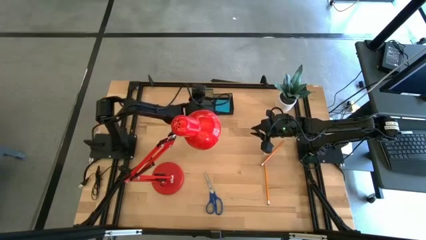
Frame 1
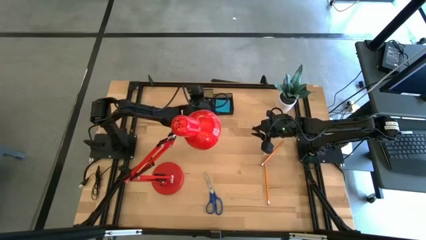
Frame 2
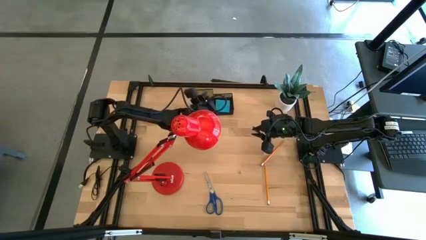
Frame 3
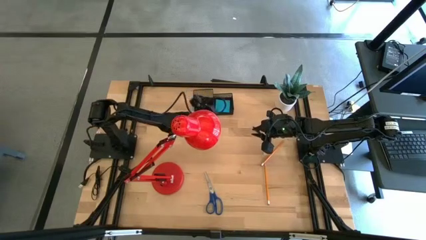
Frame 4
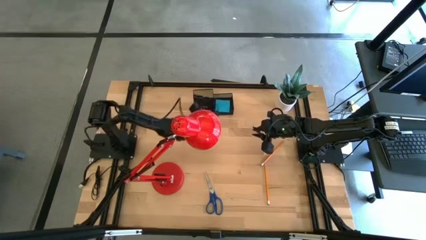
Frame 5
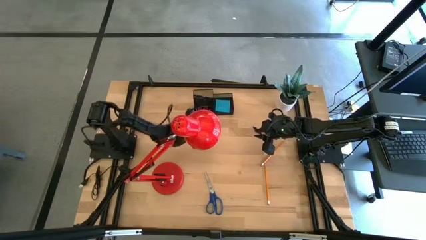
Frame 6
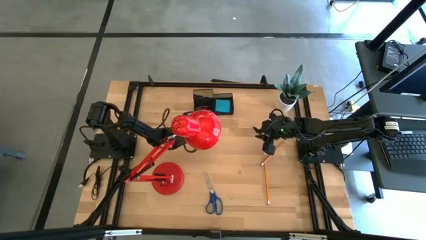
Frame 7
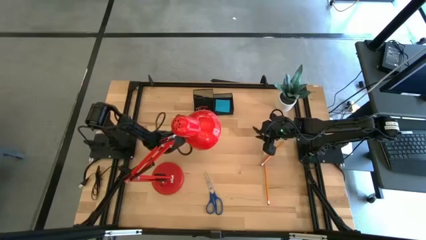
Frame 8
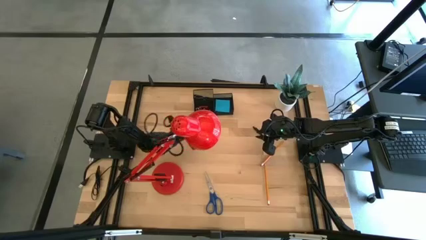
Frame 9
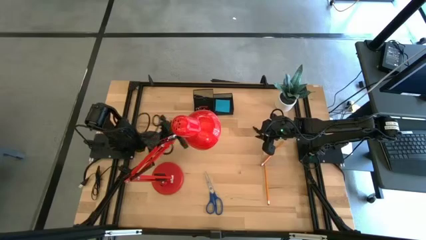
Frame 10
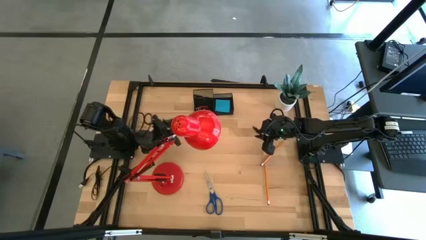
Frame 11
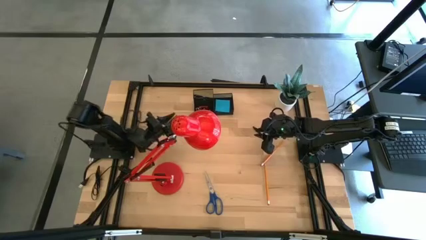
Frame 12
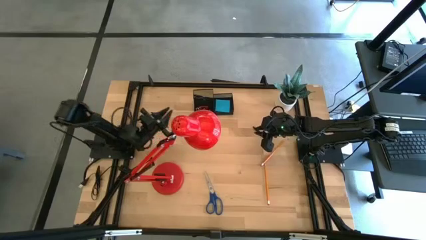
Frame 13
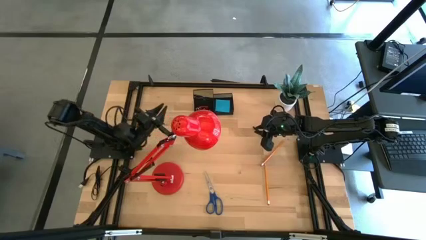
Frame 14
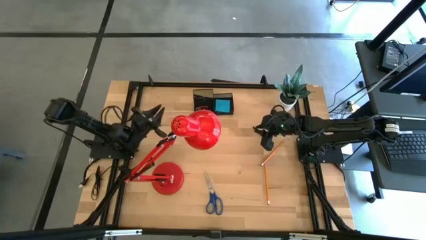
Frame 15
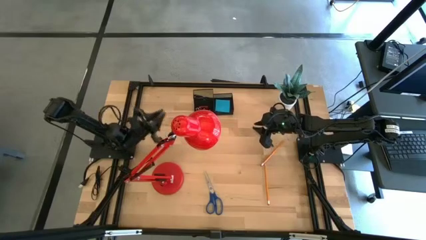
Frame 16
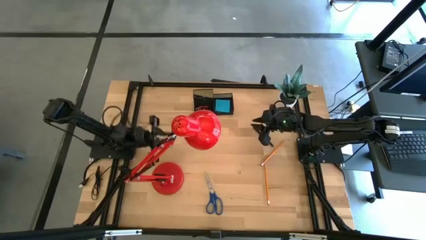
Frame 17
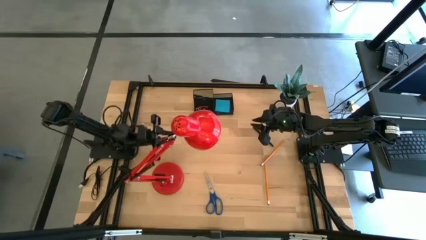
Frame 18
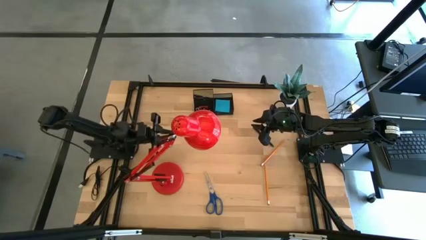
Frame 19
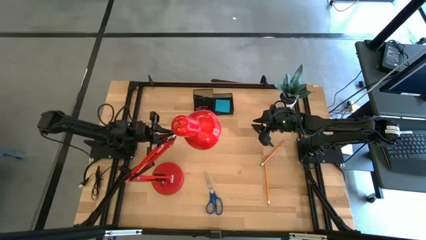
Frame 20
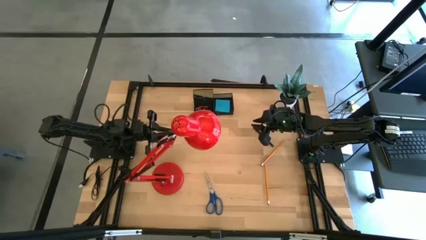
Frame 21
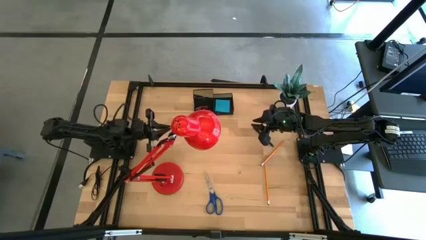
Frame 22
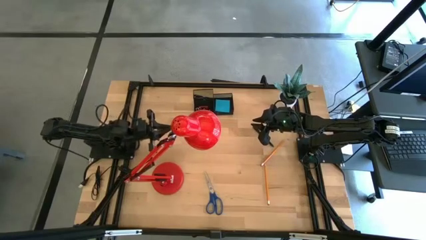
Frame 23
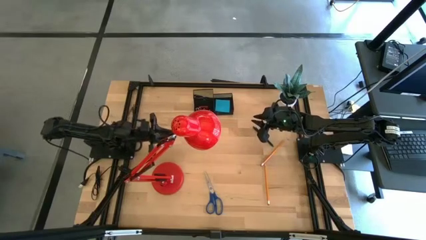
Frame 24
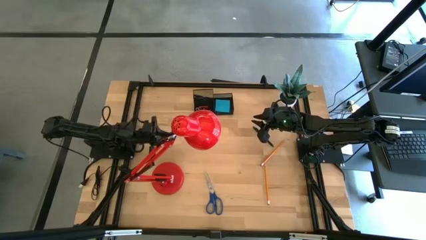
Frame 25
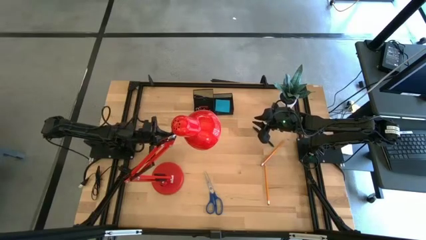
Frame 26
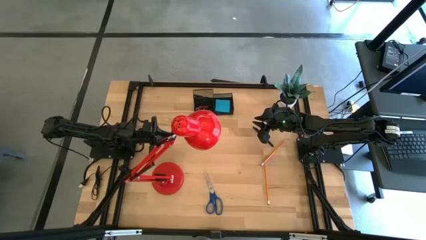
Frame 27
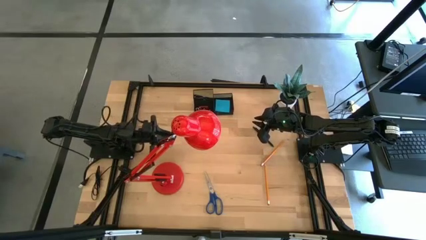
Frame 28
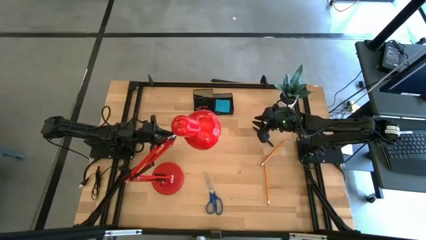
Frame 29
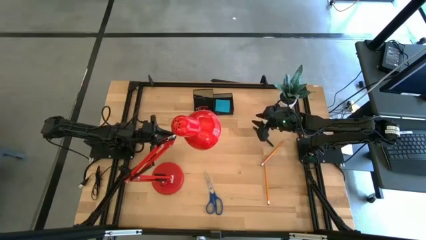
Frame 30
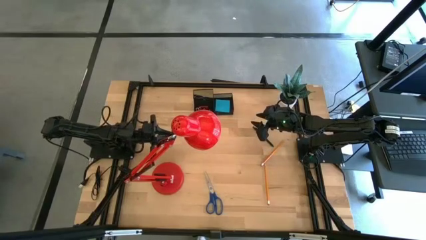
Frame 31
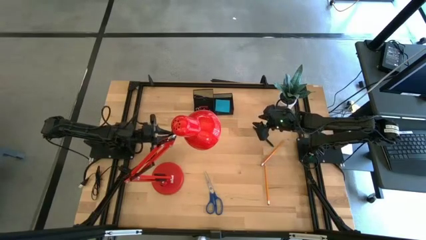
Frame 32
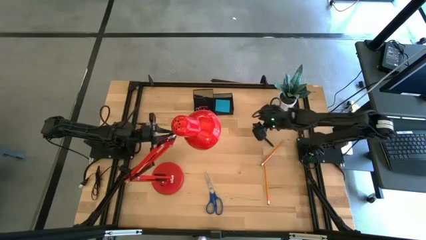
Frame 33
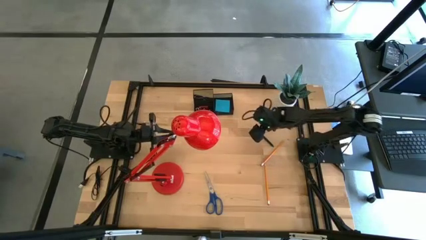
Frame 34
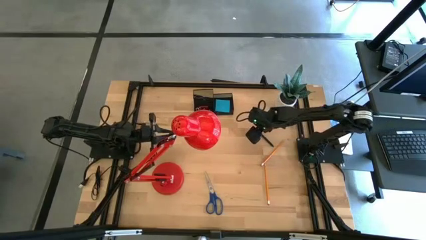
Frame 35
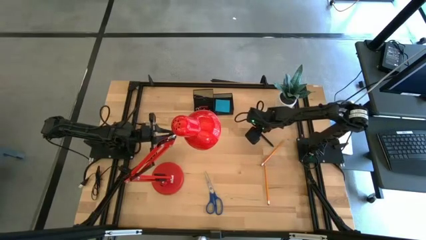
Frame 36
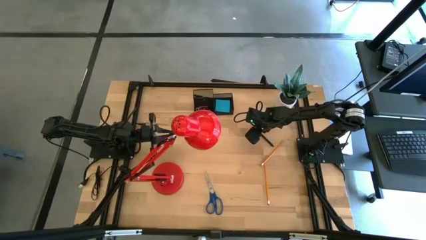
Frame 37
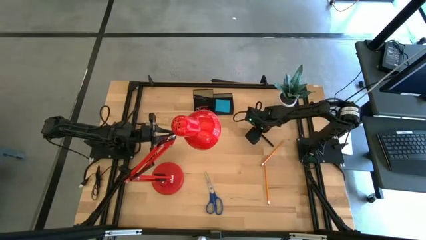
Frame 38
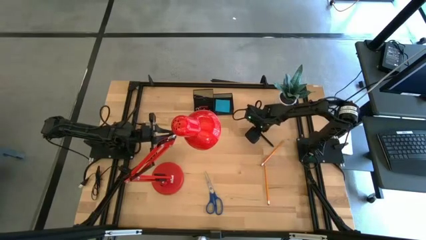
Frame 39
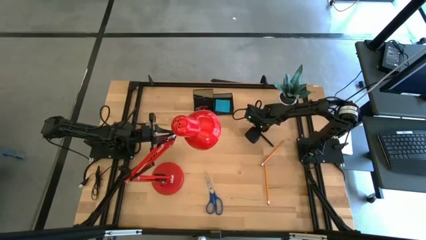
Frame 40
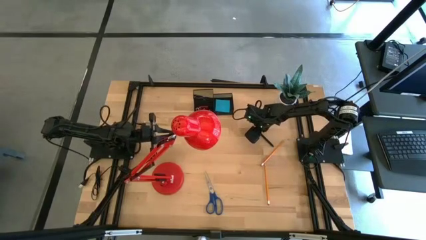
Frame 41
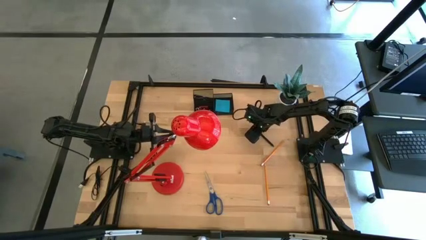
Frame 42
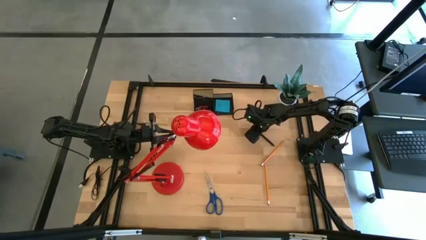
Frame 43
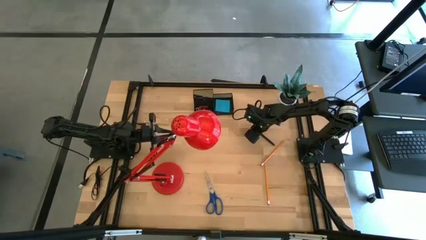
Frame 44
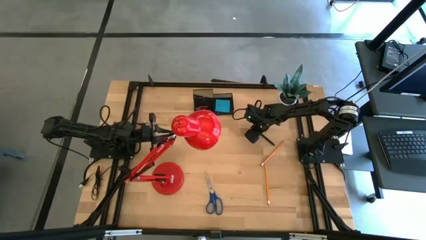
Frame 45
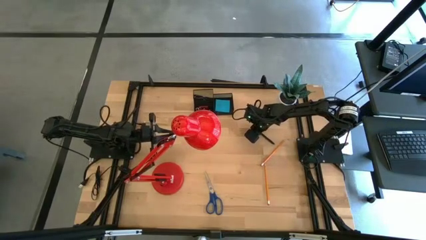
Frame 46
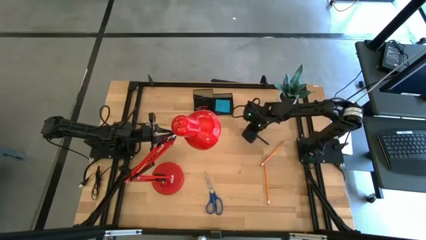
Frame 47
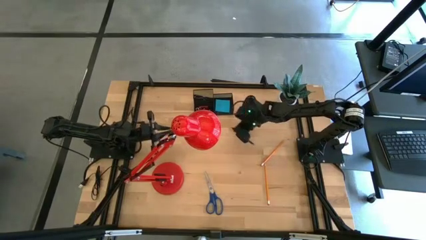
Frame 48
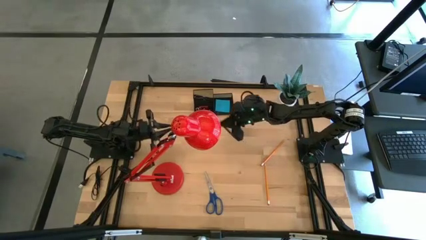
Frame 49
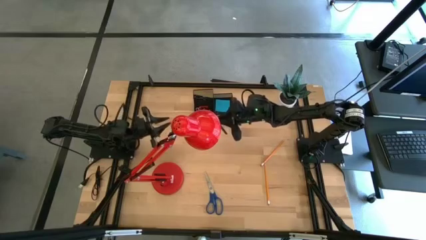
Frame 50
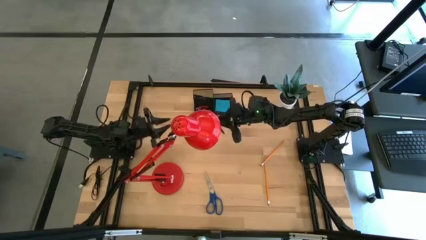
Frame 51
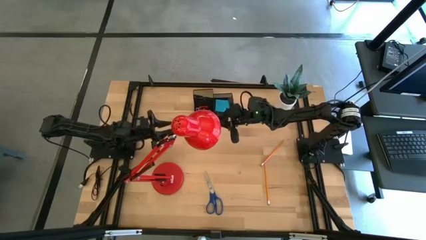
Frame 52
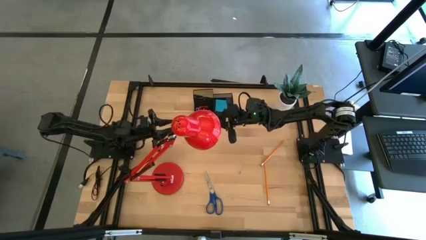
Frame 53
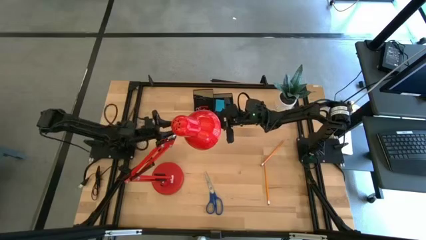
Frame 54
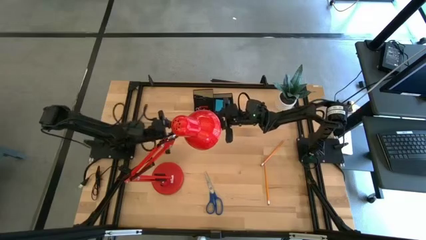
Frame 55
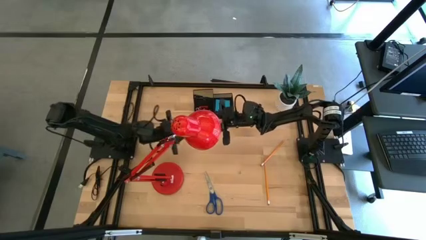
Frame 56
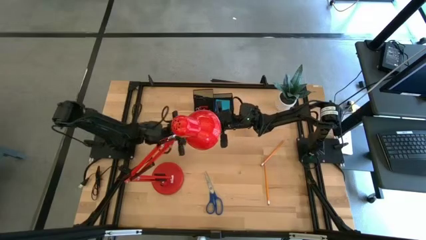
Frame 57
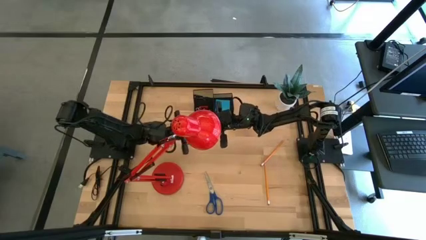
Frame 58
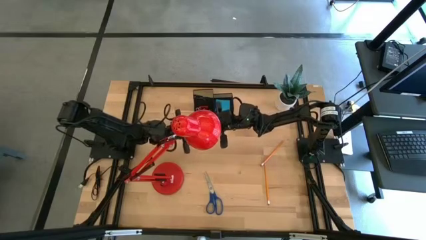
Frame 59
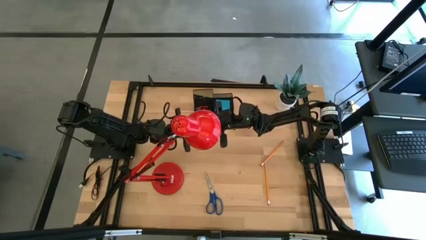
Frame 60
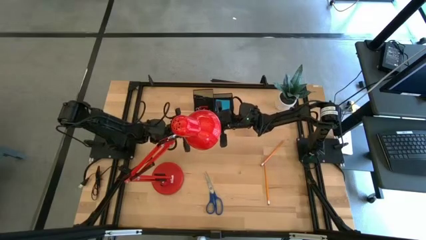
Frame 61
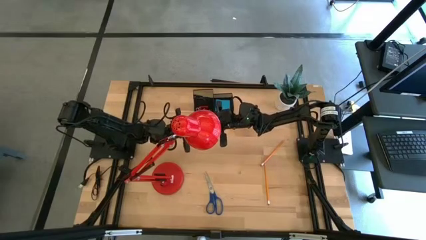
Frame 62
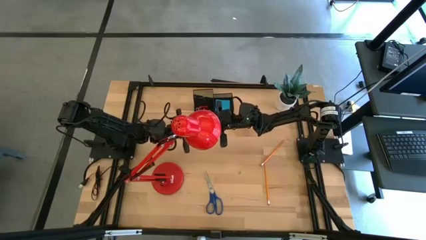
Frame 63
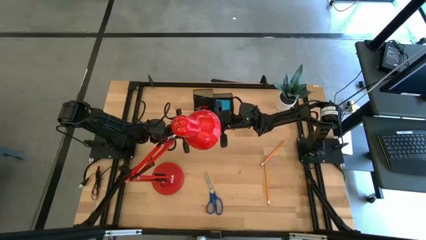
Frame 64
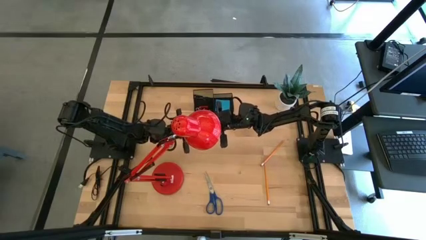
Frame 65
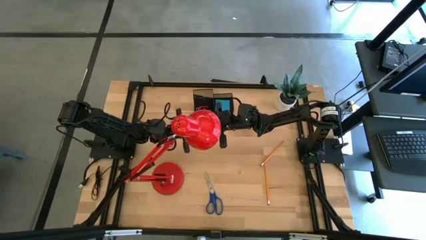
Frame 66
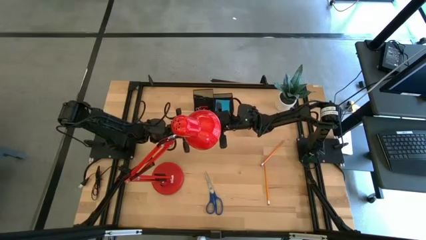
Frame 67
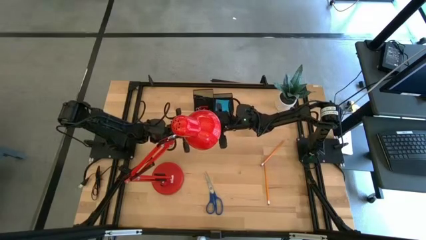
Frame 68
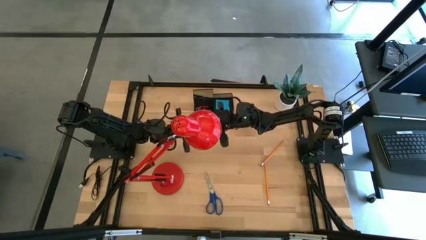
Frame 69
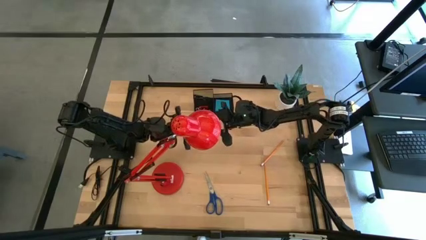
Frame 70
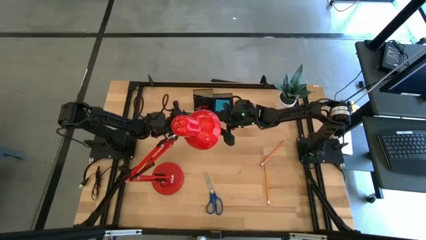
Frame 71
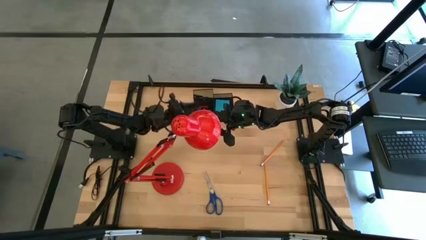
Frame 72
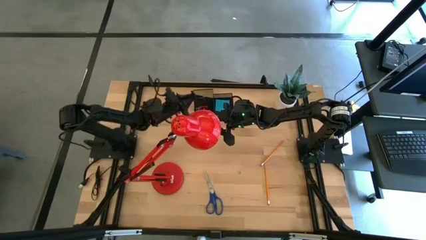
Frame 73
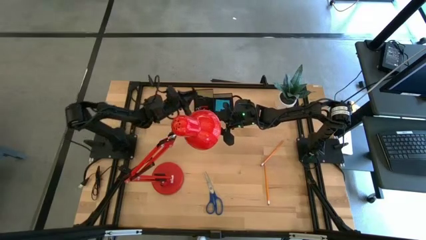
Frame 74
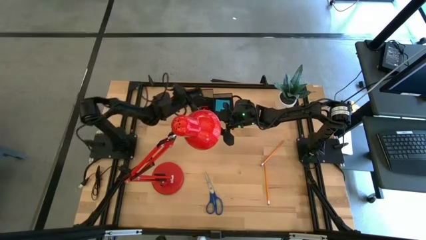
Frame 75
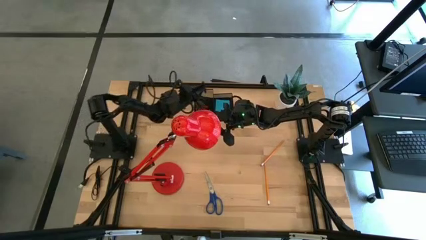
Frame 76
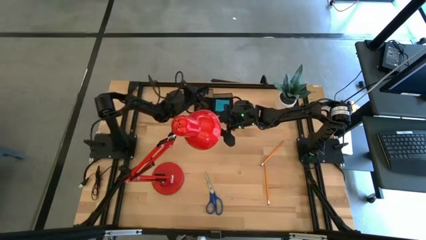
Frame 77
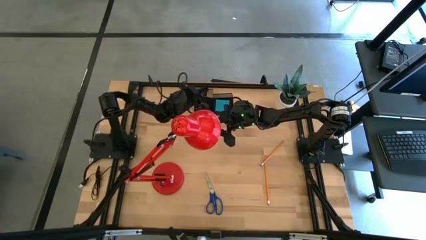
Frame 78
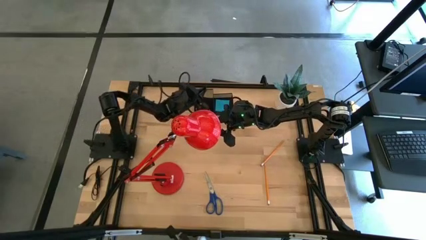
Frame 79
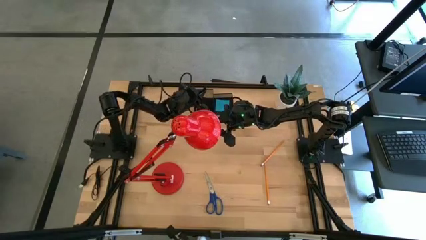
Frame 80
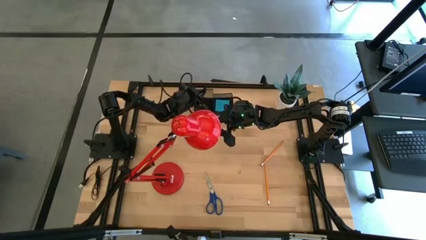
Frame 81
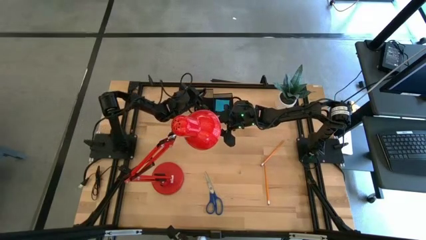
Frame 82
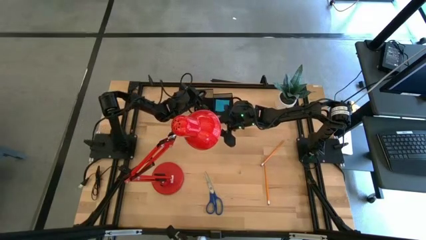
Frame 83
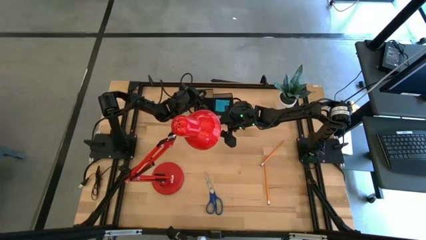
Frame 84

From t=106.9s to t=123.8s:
Task: Pick and place office supplies into organizer
Put the pen into the desk organizer
